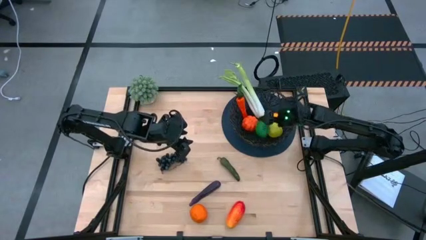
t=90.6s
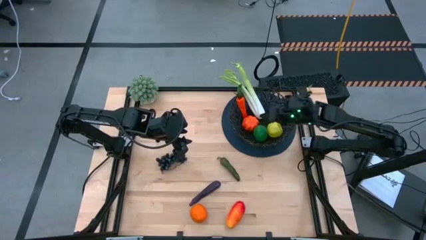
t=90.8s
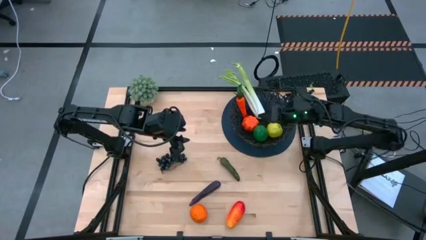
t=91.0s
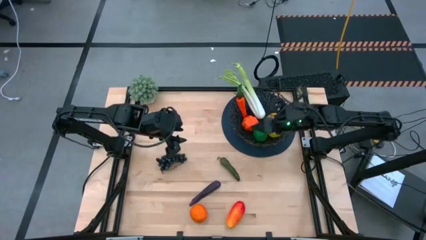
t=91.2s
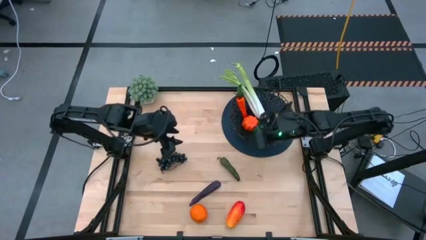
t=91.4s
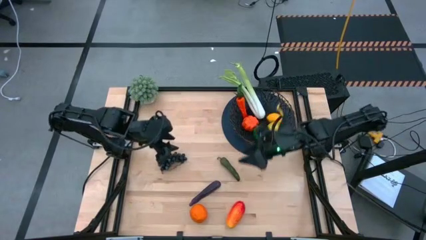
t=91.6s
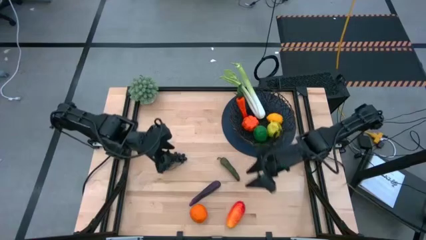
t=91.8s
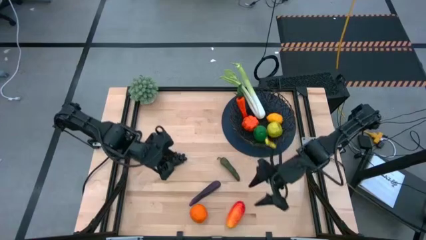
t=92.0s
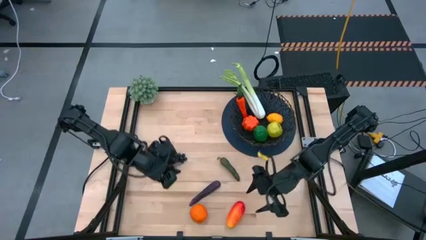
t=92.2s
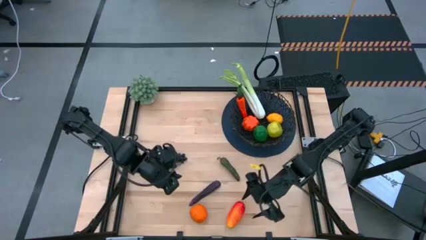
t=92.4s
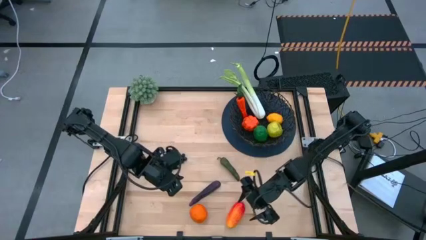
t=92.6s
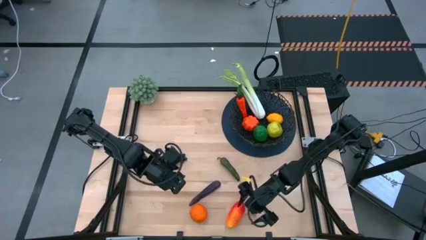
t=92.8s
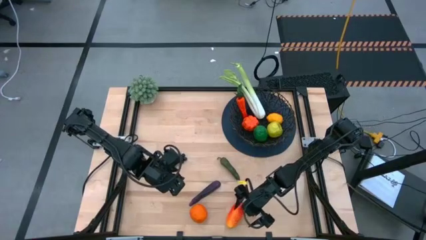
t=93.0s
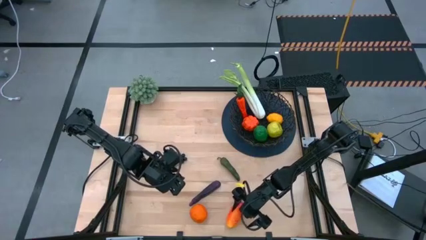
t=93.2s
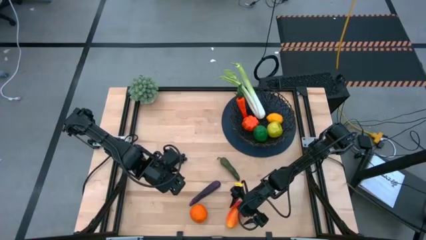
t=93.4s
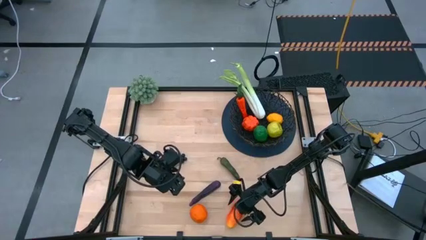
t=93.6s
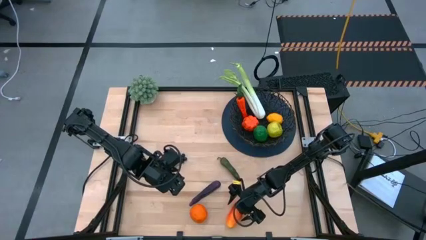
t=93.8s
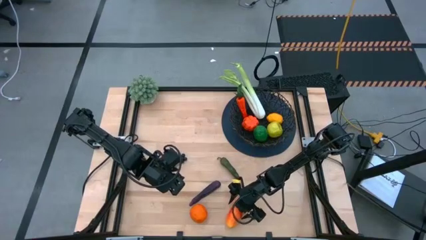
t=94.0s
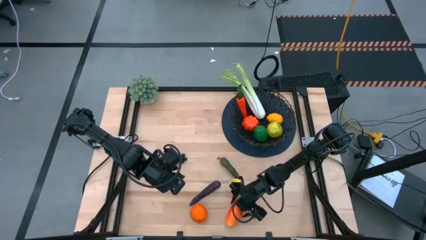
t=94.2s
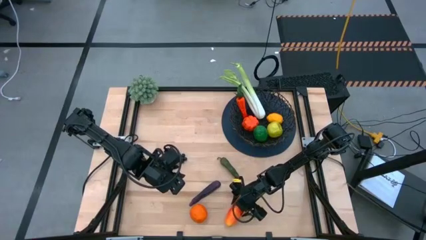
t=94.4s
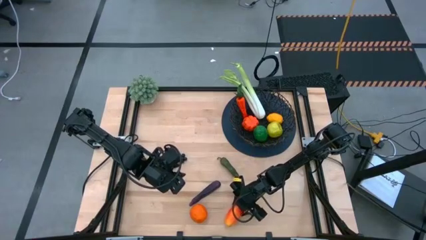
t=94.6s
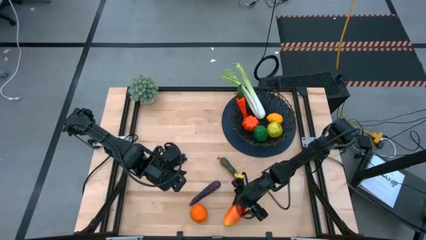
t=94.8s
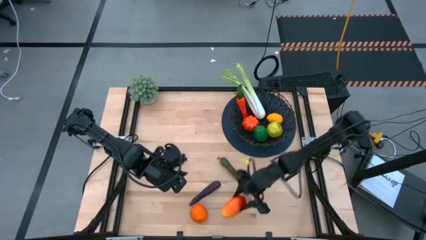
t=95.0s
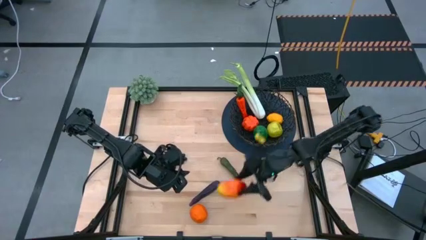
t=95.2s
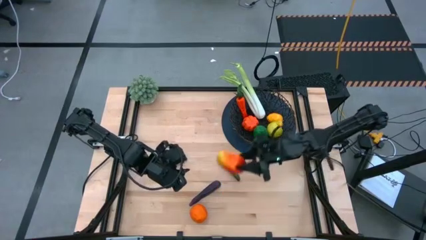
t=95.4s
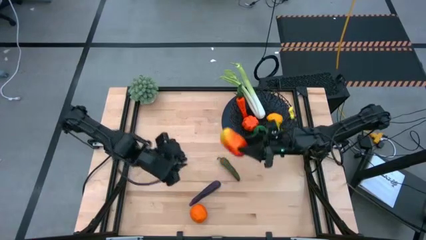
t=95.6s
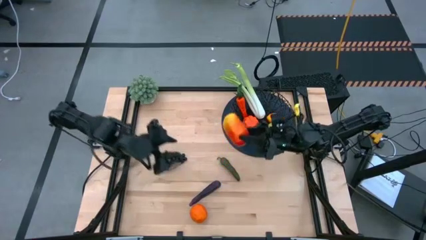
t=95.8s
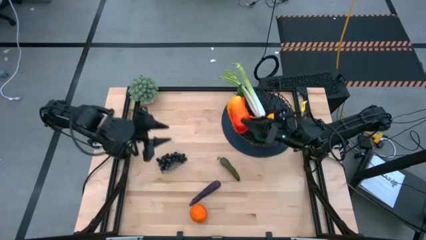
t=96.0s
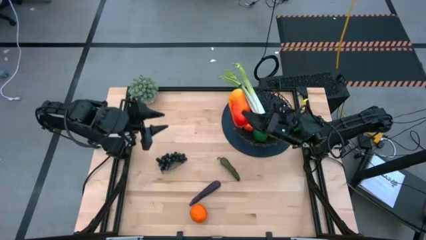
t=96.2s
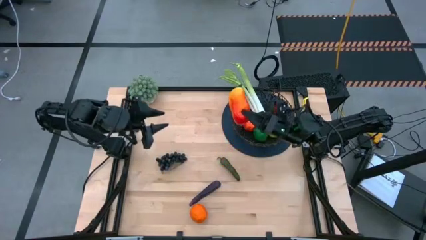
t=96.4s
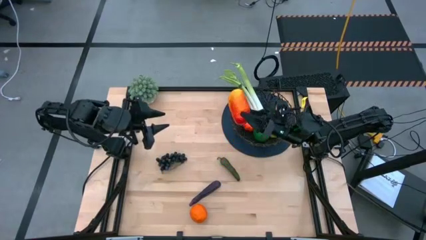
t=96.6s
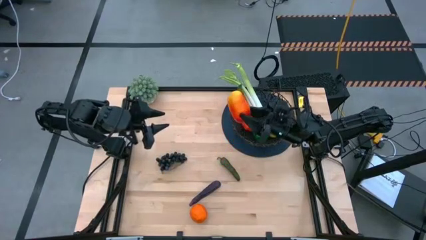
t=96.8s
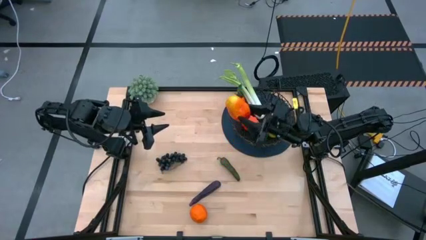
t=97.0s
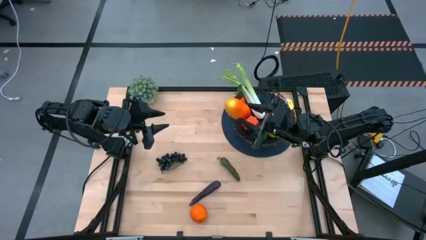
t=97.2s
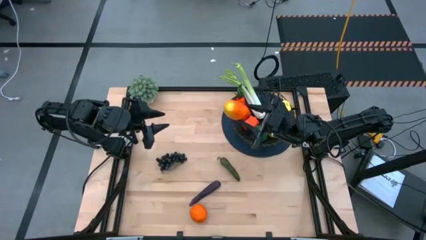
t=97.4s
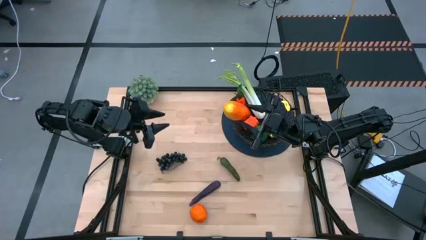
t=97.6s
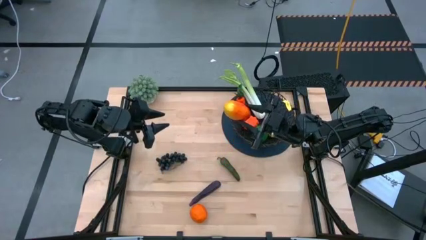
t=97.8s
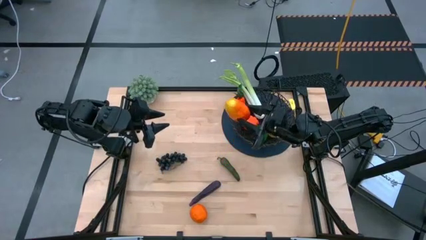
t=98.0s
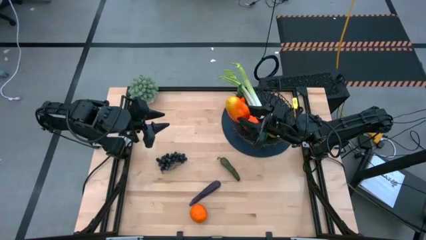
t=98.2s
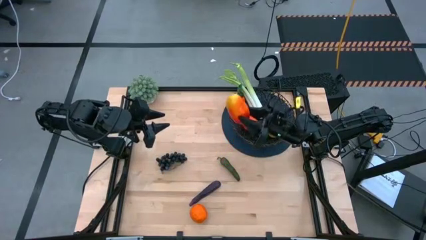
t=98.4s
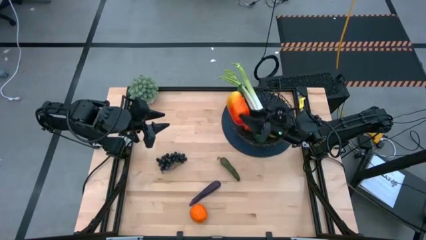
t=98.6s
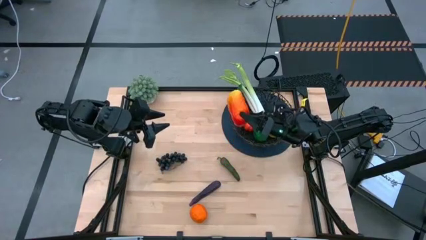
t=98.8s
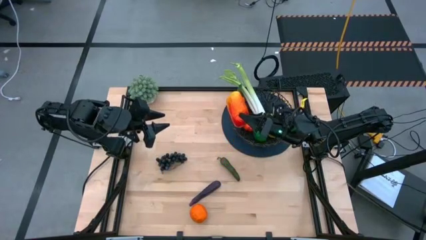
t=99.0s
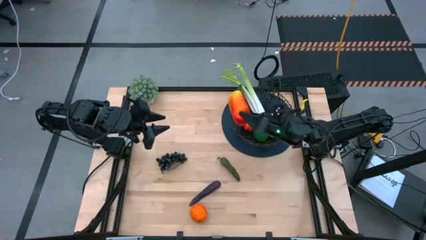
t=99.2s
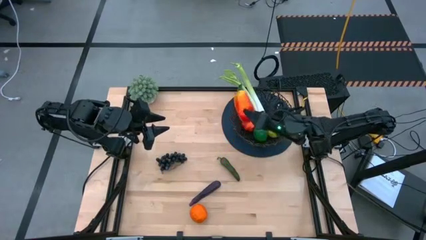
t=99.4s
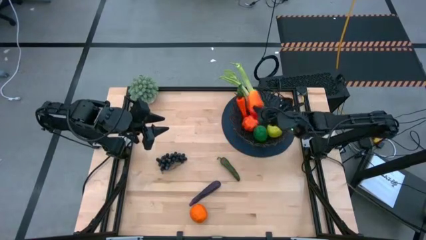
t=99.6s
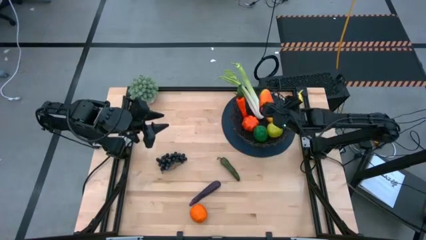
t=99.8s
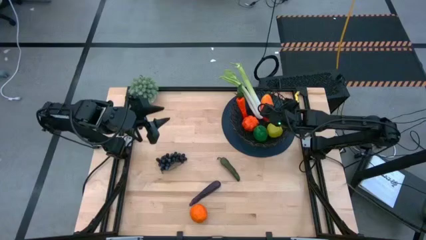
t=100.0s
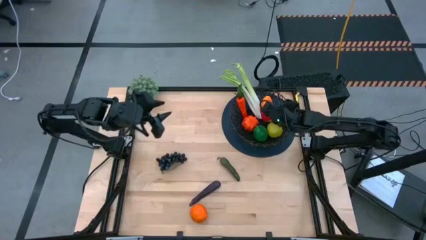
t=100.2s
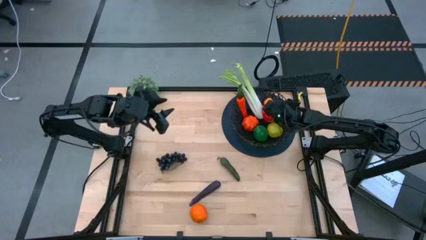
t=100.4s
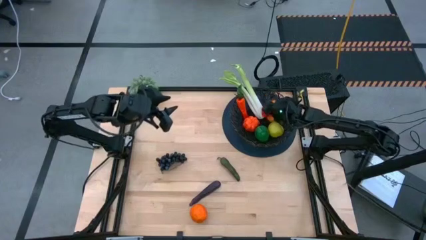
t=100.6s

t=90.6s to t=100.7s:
Task: Build produce basket
Put the yellow mango into the black woven basket
